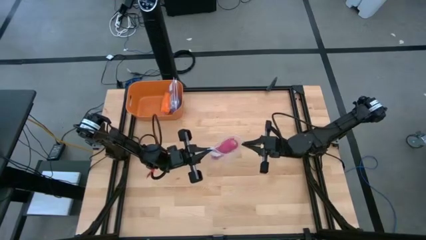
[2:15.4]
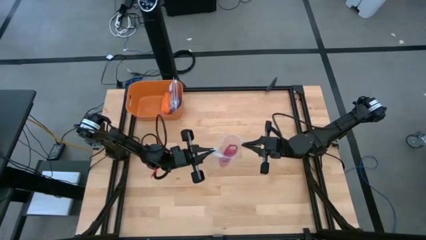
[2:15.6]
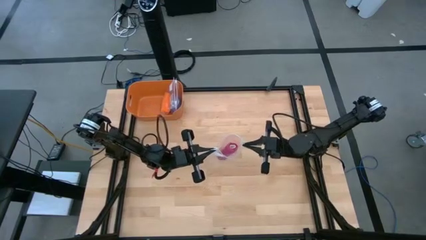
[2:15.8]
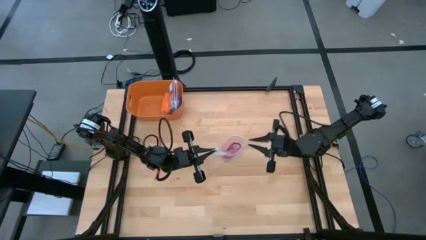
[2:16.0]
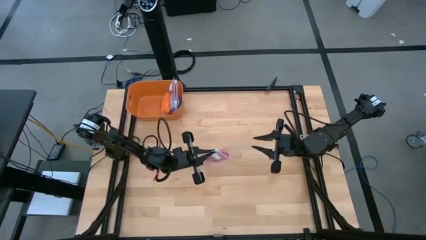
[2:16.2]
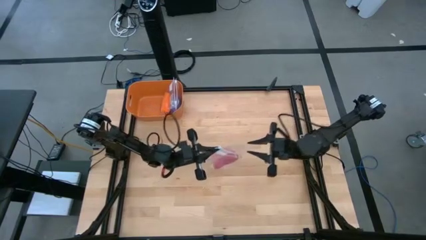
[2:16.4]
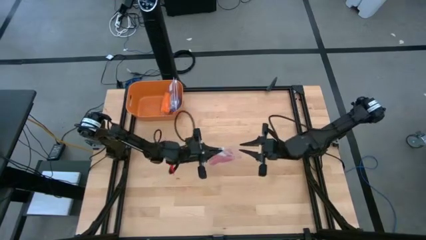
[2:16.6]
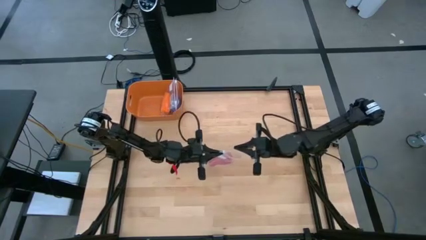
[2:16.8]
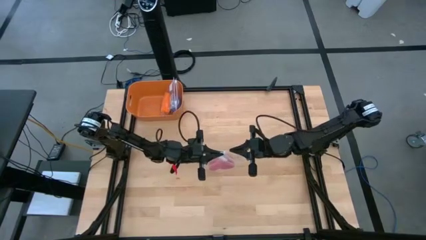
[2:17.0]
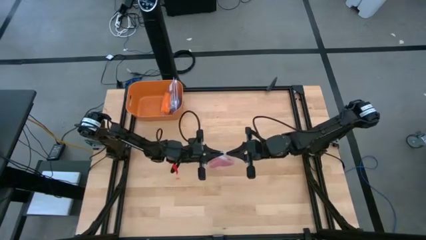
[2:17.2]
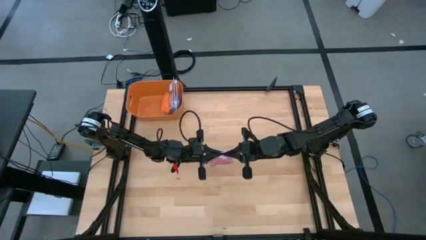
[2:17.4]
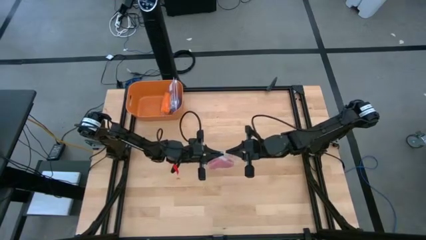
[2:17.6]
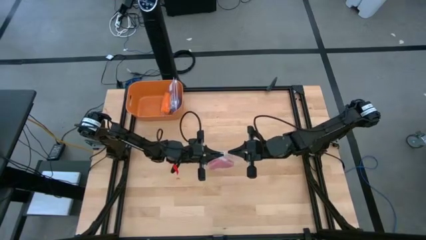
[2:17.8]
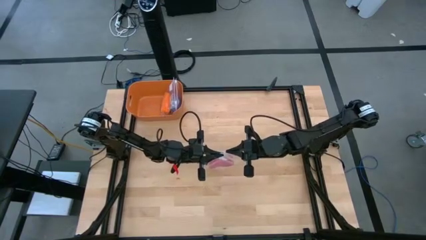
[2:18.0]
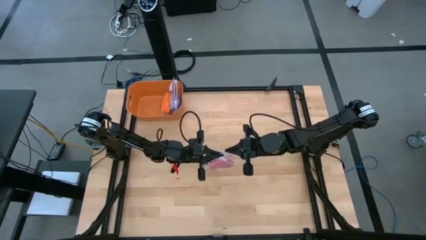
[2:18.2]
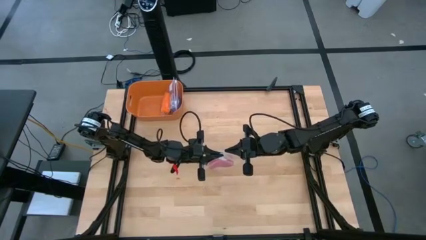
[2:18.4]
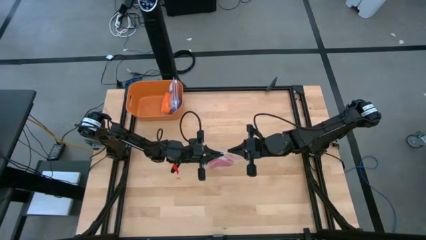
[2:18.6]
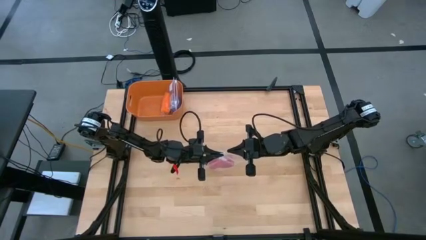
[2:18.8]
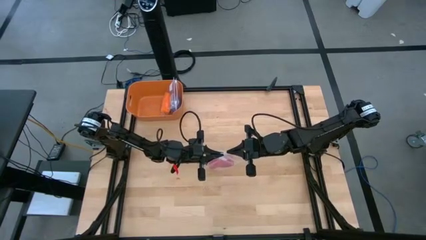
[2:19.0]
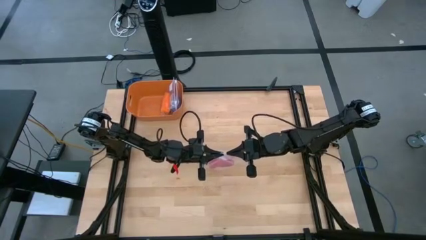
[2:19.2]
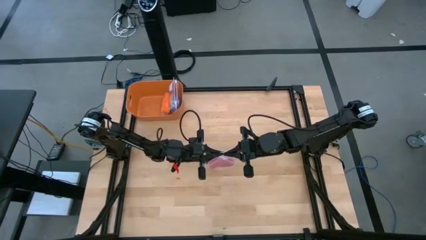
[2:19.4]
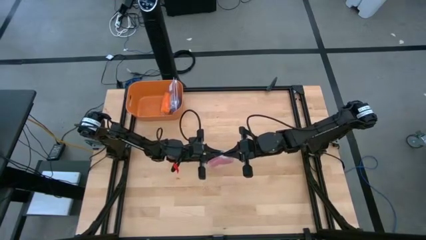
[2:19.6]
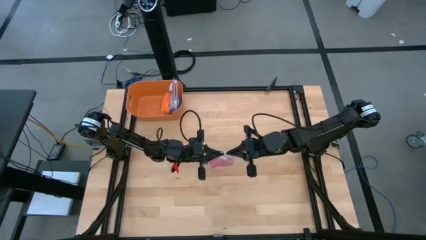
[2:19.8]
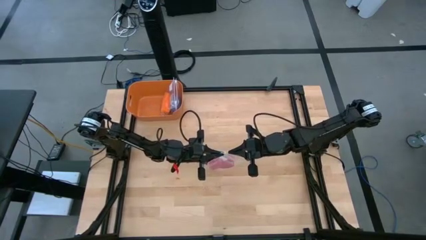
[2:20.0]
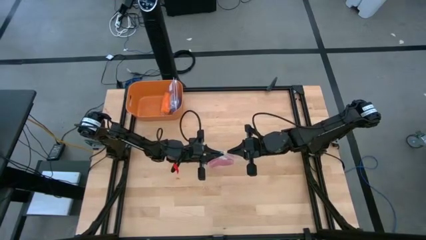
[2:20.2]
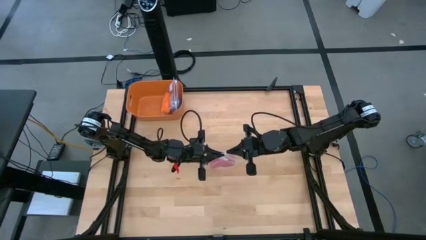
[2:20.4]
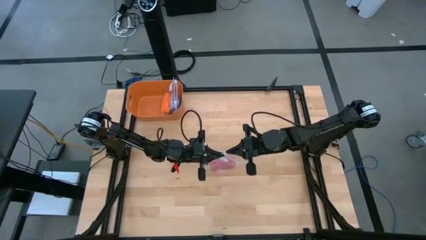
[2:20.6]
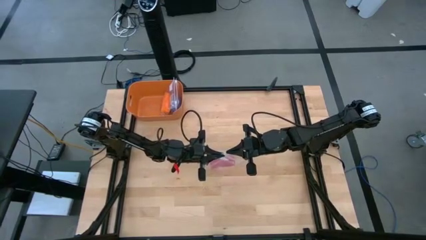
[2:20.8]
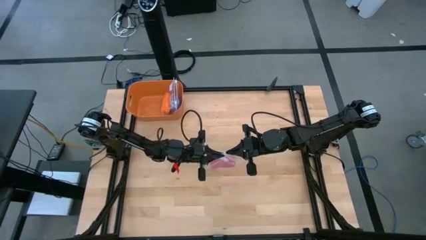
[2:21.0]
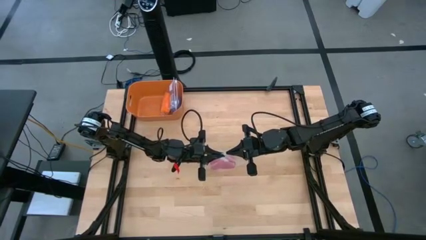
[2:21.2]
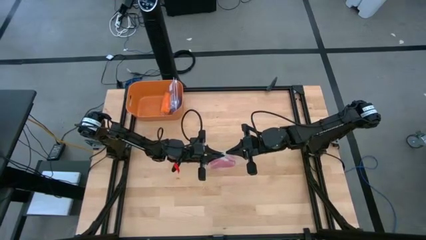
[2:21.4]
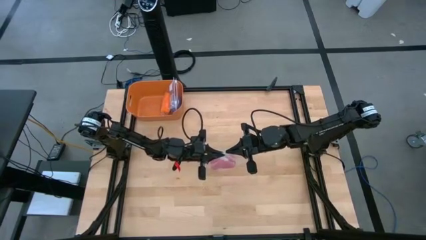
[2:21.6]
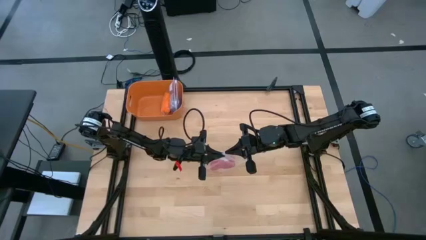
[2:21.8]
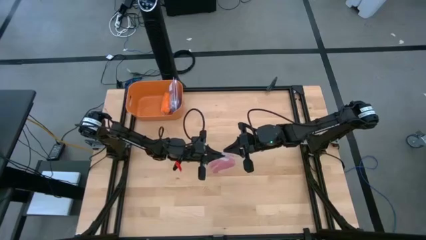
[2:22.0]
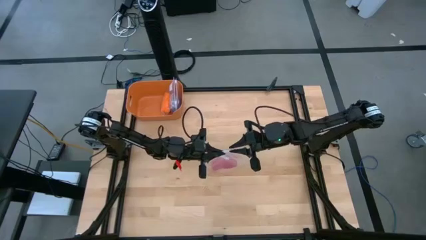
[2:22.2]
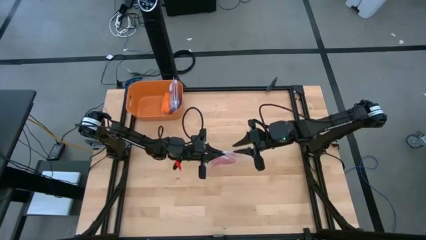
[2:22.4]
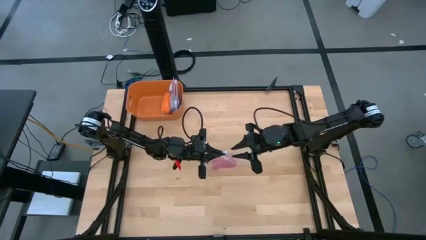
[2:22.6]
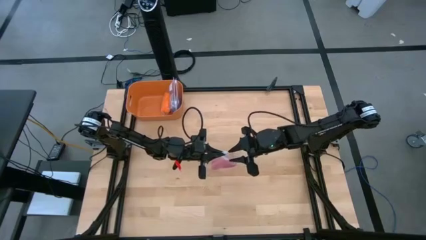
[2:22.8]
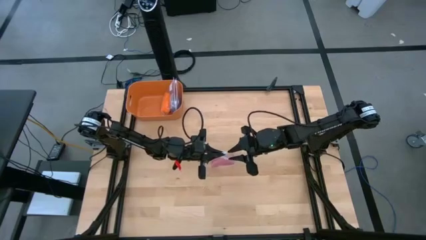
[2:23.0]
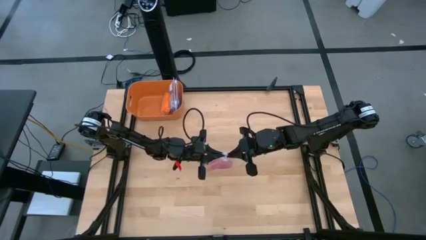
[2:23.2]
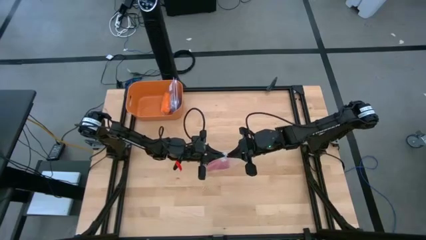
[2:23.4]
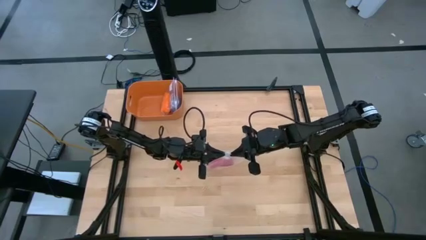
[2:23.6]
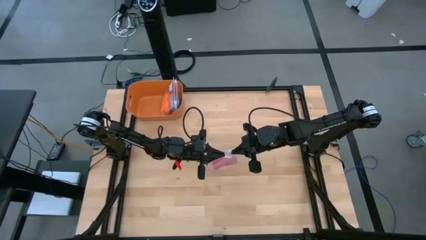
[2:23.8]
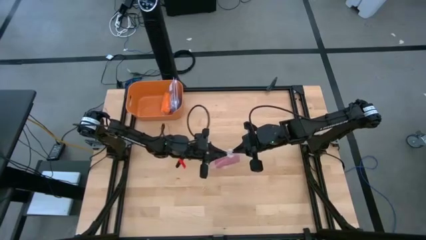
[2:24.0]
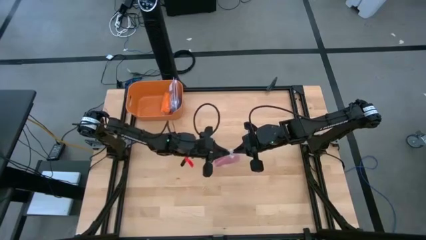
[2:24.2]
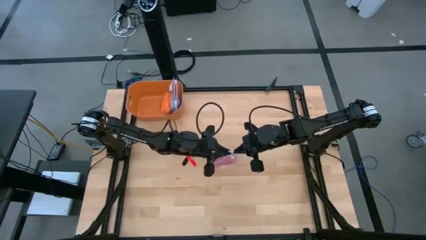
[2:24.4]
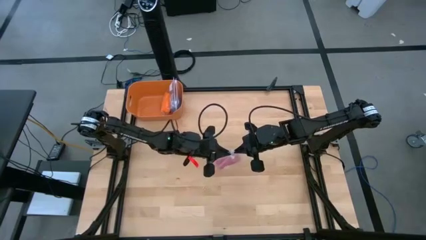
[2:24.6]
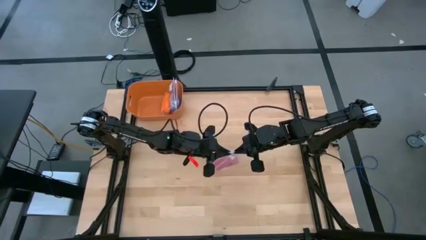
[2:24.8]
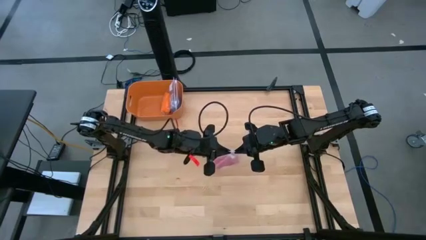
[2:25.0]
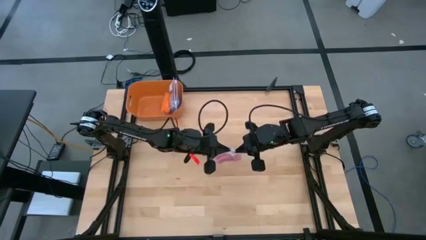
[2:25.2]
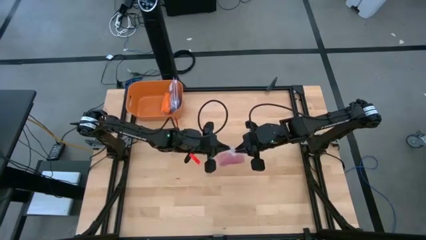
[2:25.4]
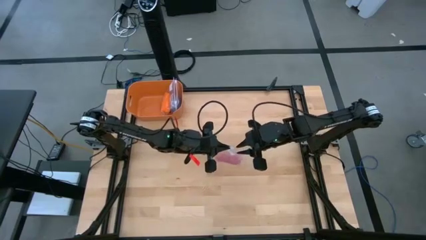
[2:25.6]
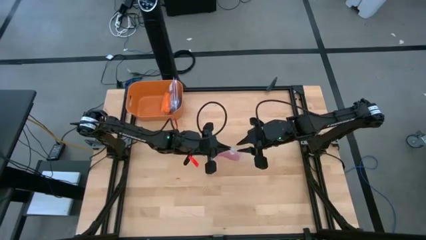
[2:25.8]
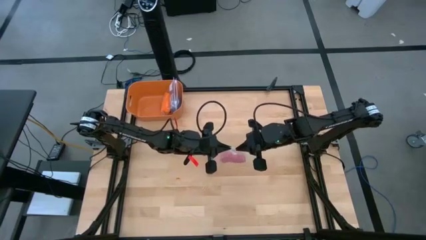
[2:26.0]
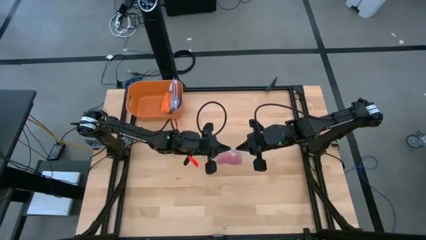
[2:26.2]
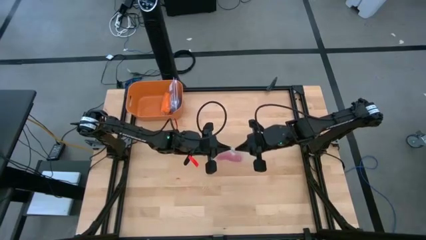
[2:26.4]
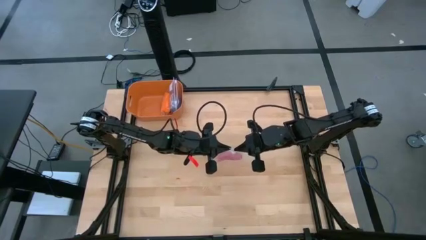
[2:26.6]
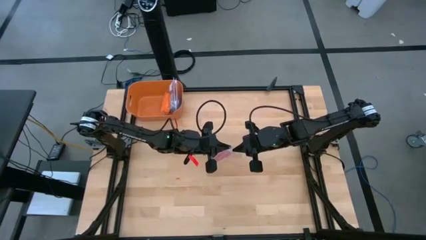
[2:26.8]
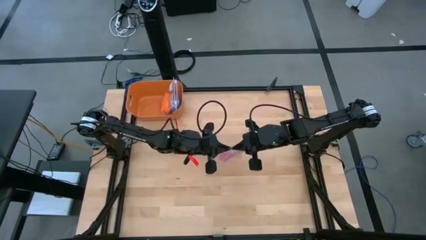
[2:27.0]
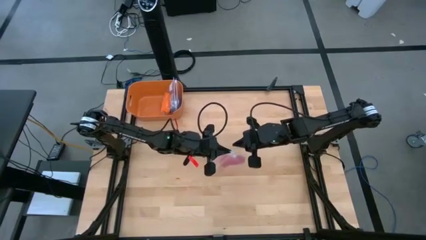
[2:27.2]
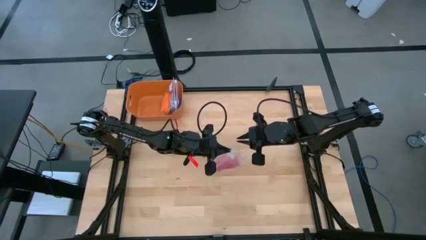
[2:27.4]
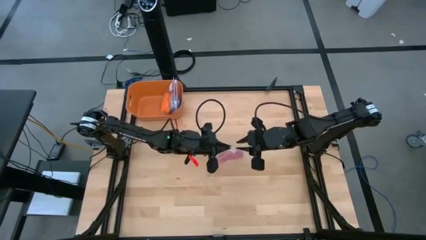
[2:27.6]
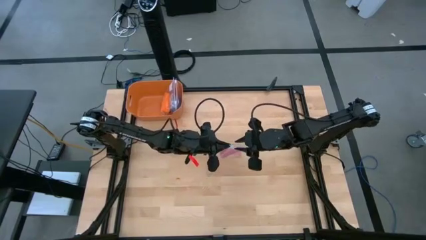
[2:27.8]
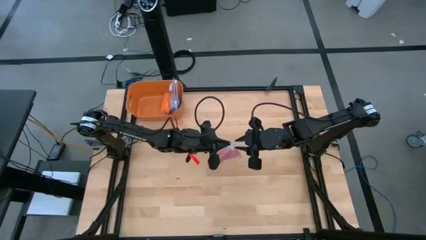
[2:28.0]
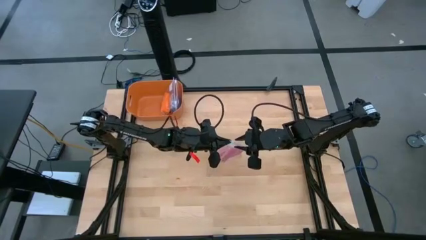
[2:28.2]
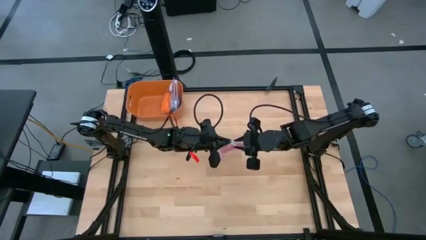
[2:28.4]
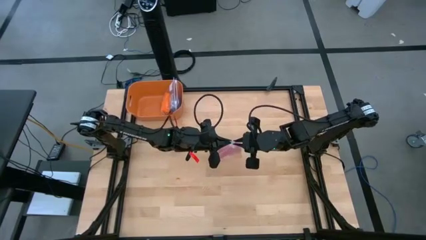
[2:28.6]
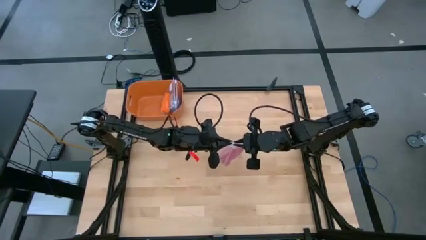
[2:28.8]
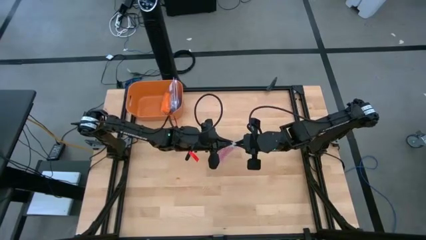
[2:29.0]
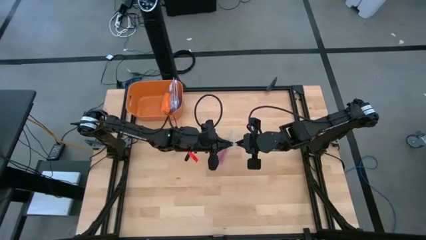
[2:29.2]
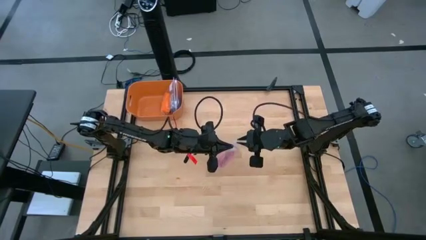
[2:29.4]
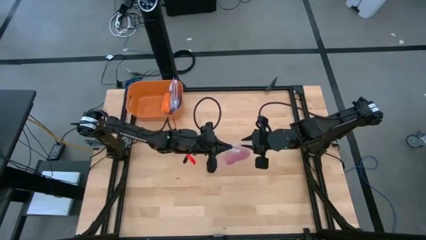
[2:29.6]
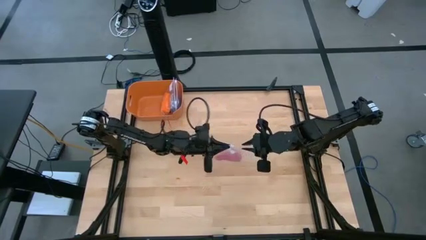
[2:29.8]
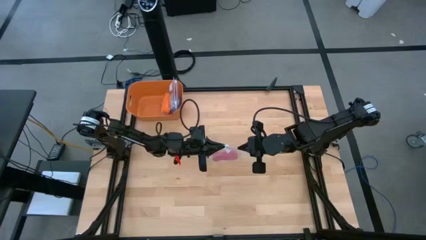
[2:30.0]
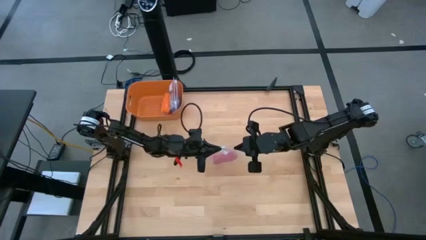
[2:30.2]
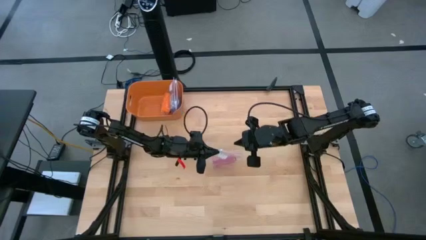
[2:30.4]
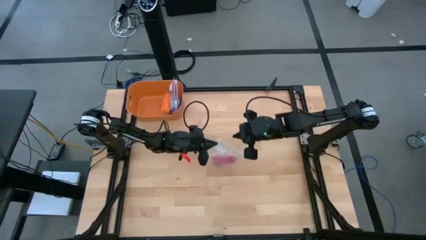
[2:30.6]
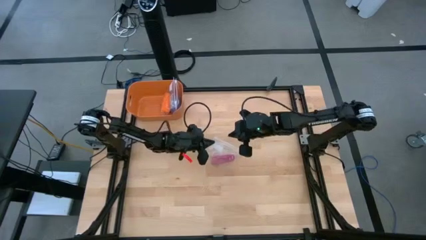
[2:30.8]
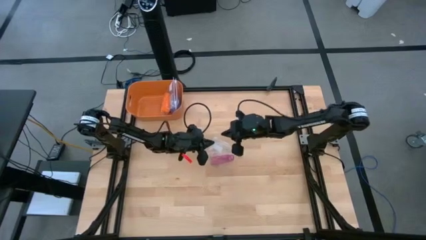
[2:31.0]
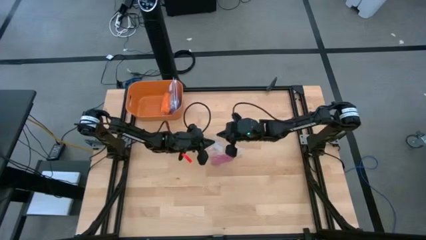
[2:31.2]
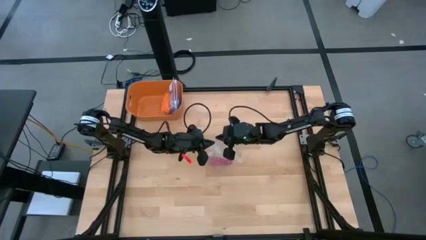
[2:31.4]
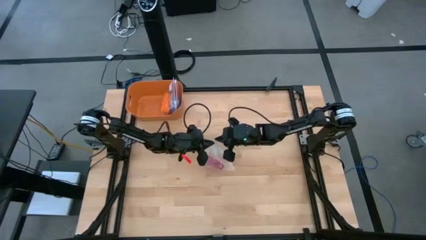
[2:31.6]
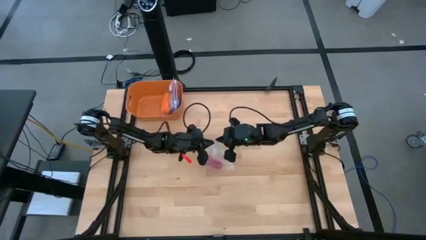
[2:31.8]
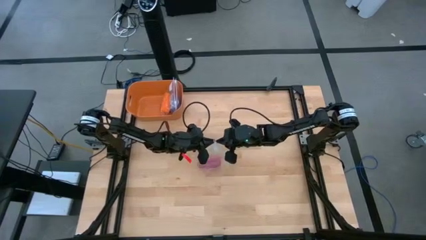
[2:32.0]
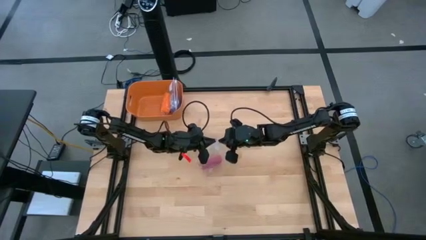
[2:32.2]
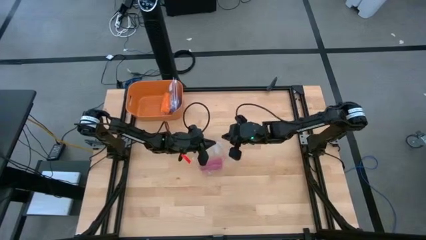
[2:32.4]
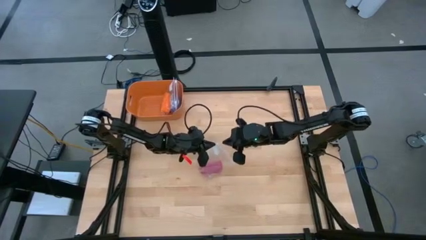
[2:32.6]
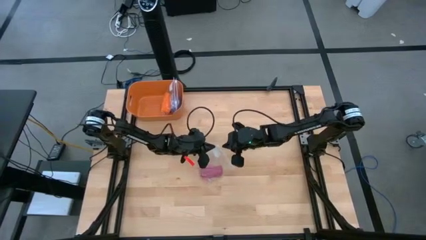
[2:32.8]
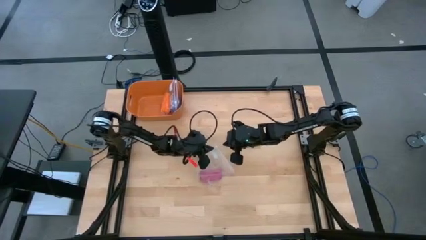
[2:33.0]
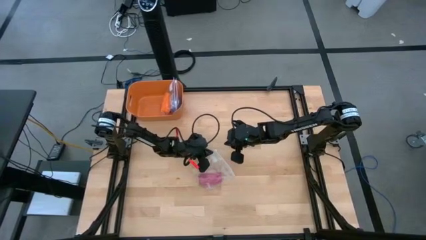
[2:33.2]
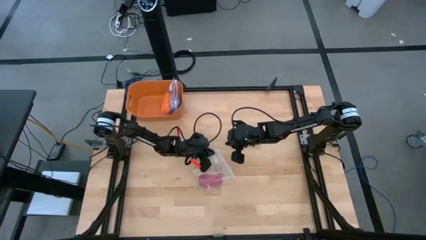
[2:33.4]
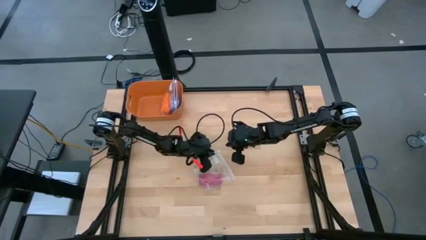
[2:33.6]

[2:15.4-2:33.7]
Task: Roll bandage
Close the transparent zip bag
